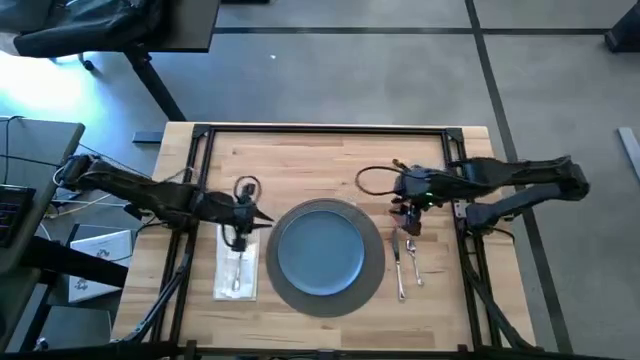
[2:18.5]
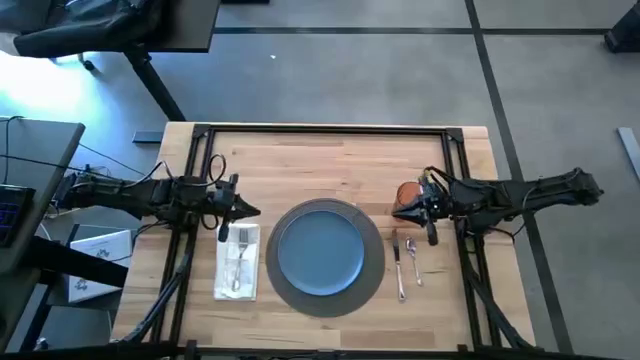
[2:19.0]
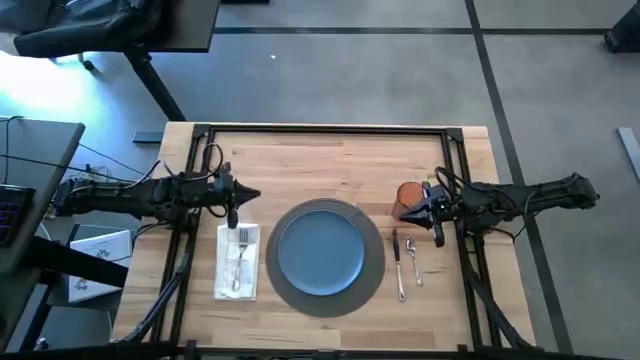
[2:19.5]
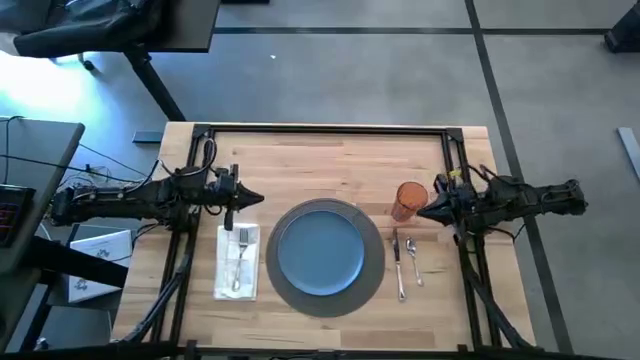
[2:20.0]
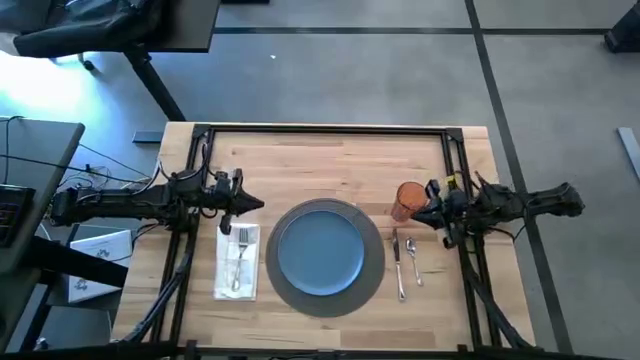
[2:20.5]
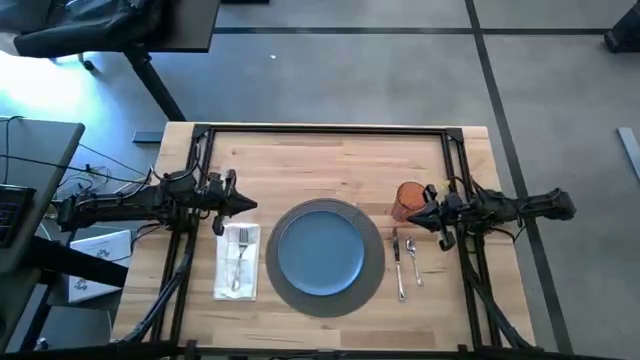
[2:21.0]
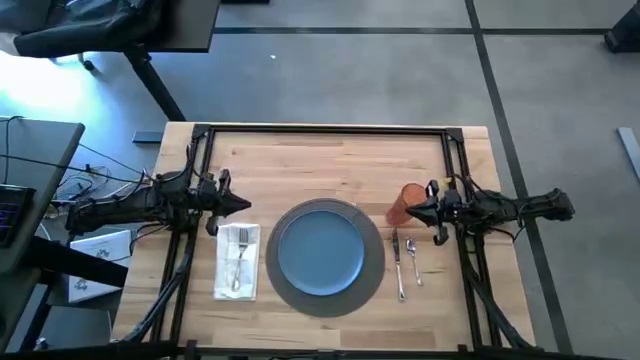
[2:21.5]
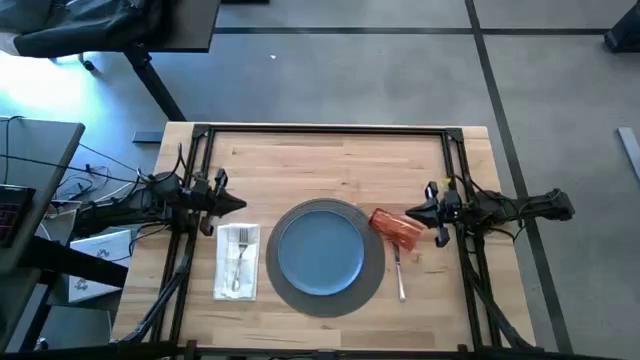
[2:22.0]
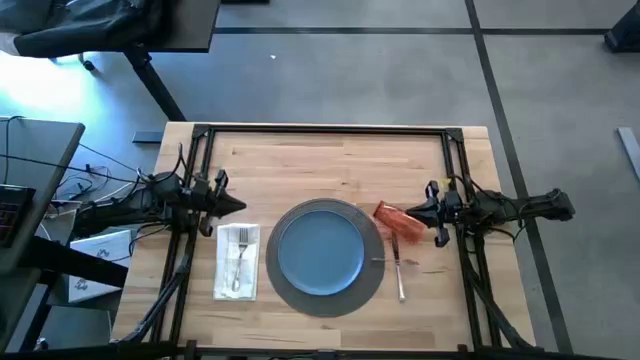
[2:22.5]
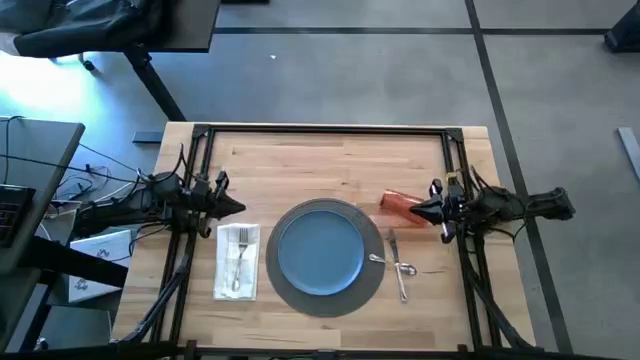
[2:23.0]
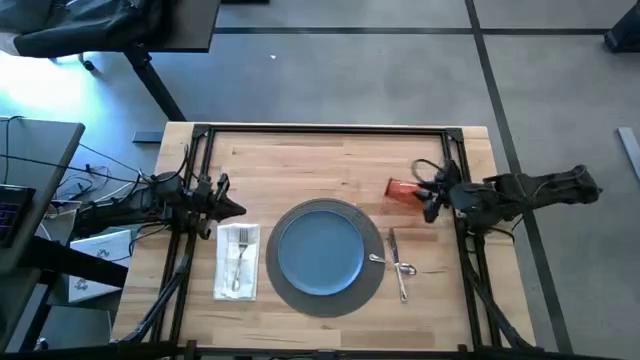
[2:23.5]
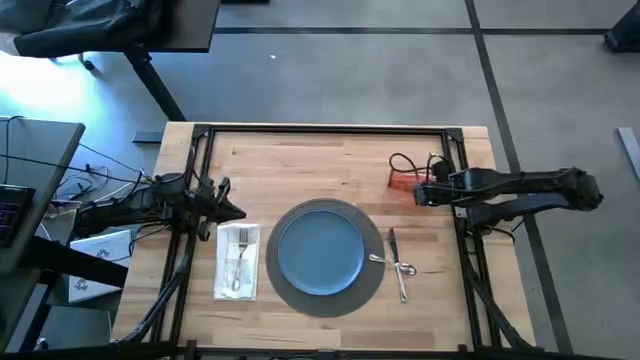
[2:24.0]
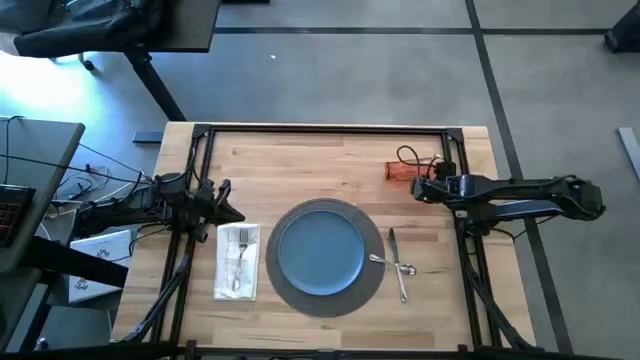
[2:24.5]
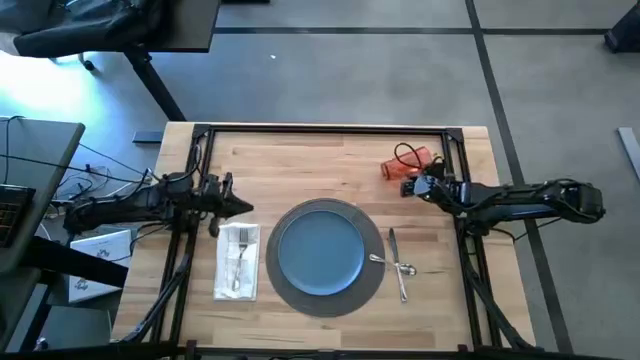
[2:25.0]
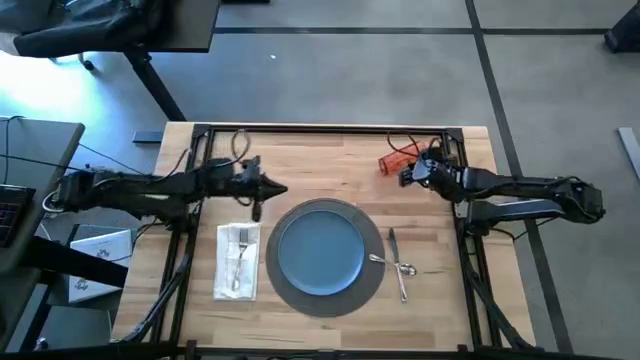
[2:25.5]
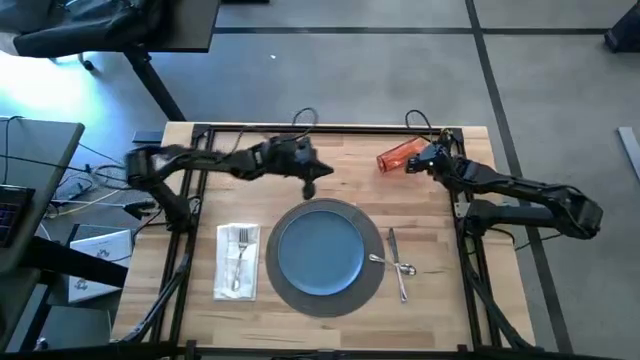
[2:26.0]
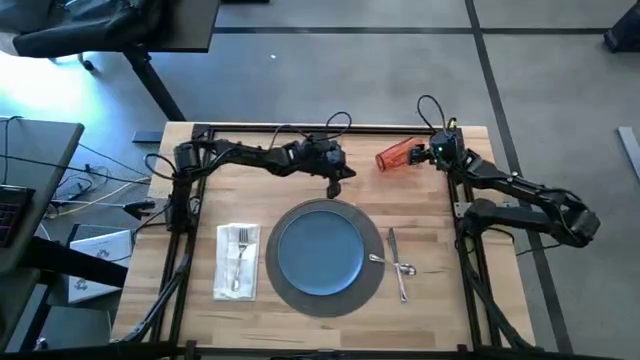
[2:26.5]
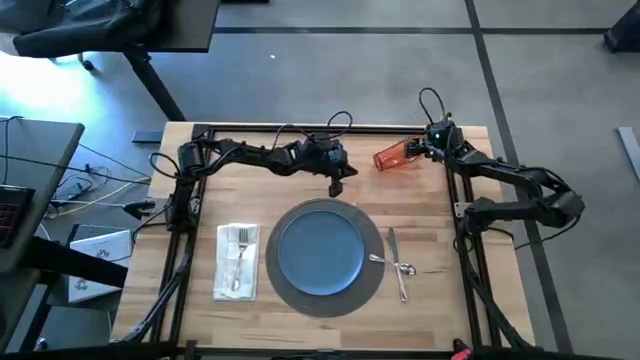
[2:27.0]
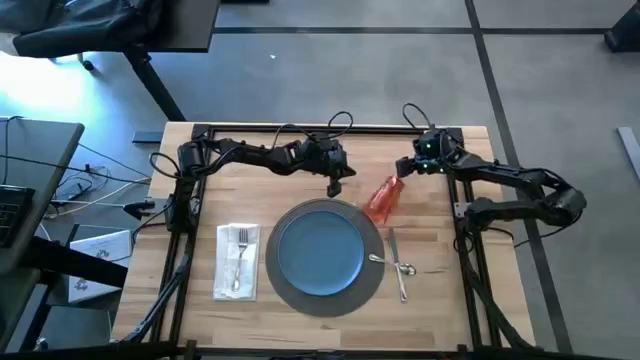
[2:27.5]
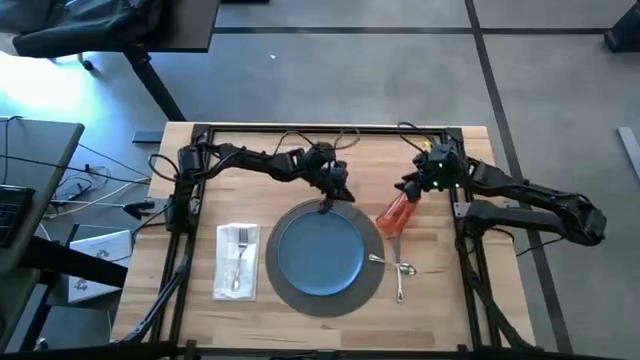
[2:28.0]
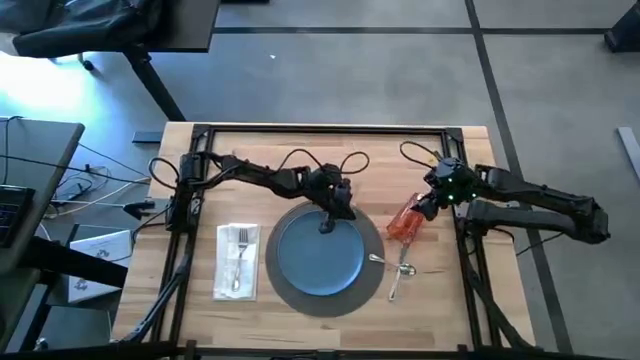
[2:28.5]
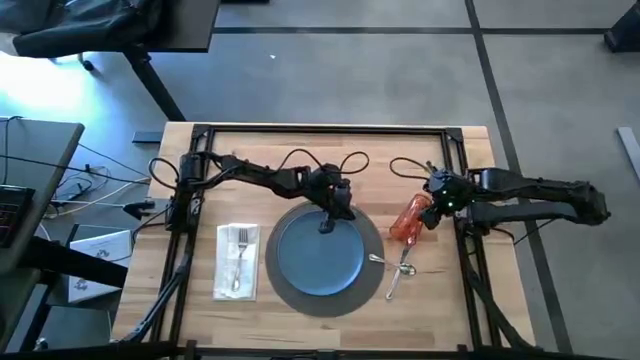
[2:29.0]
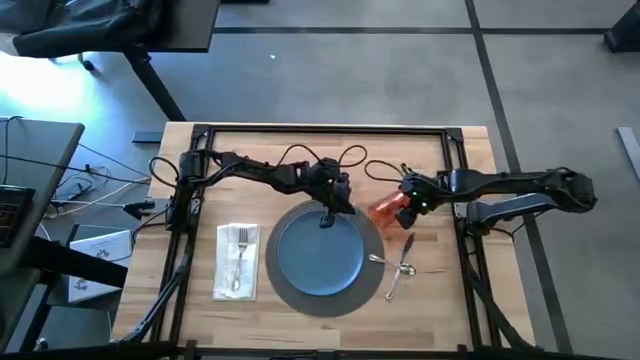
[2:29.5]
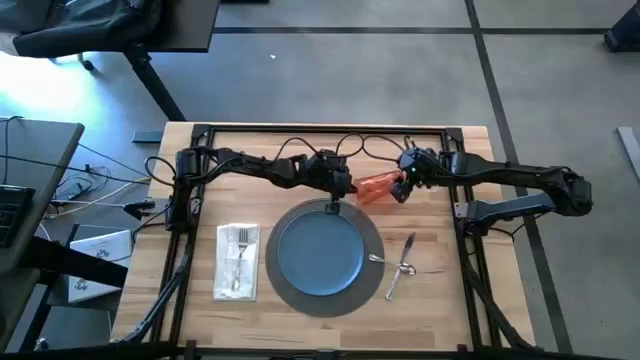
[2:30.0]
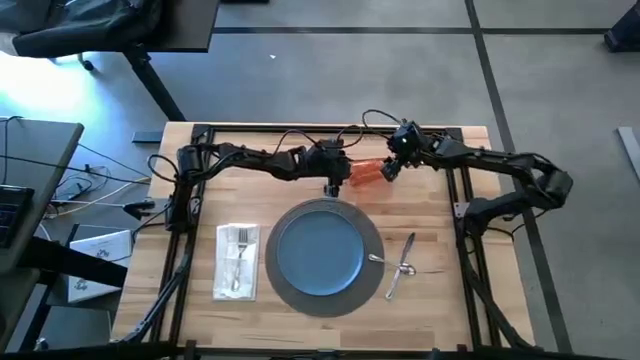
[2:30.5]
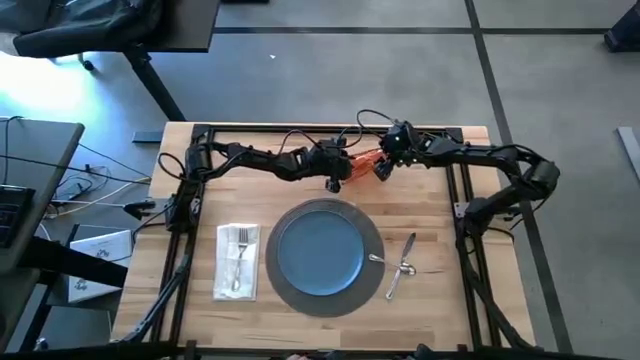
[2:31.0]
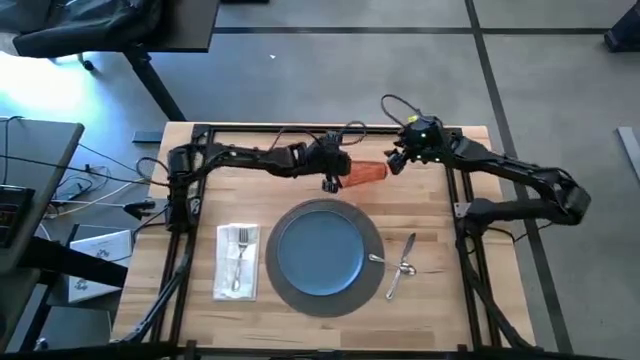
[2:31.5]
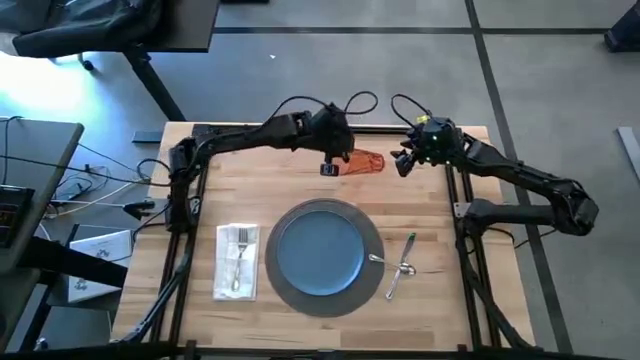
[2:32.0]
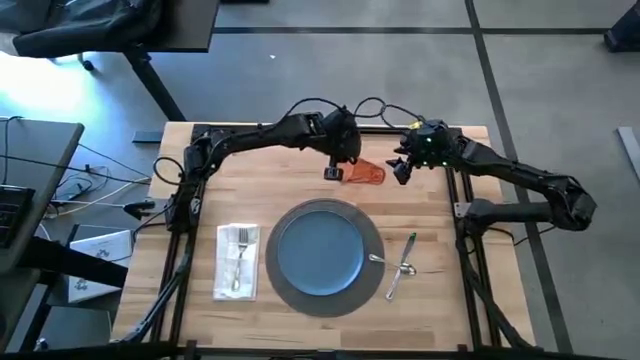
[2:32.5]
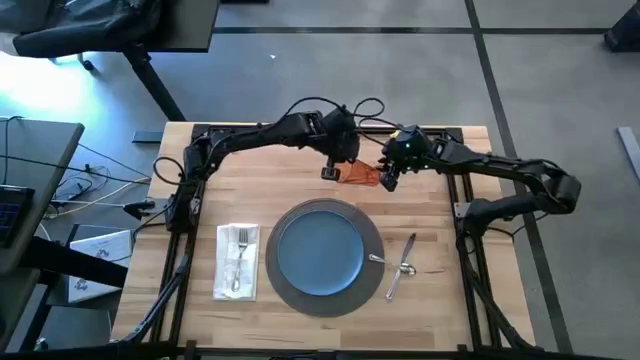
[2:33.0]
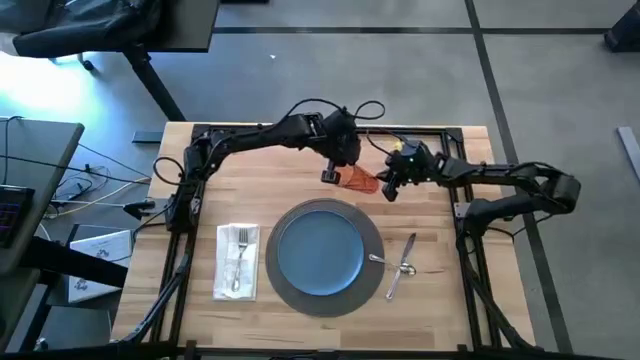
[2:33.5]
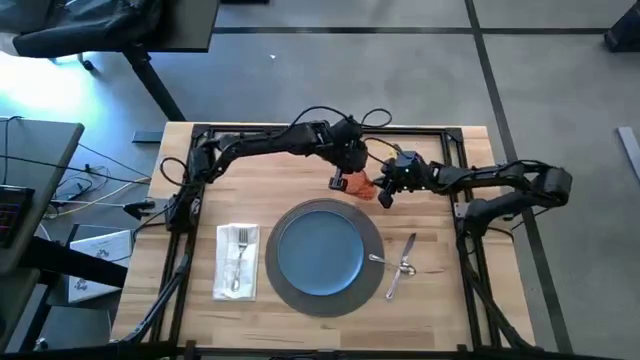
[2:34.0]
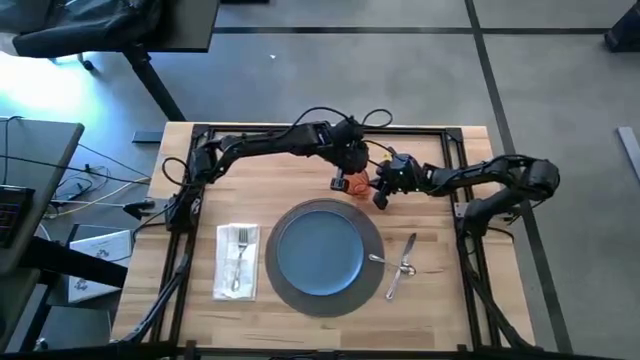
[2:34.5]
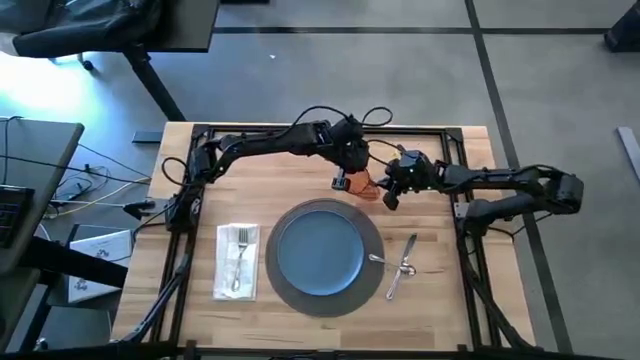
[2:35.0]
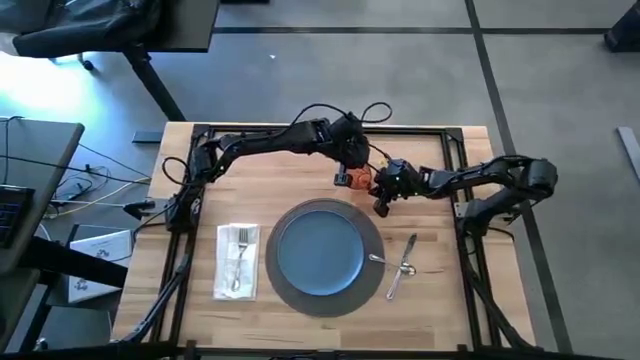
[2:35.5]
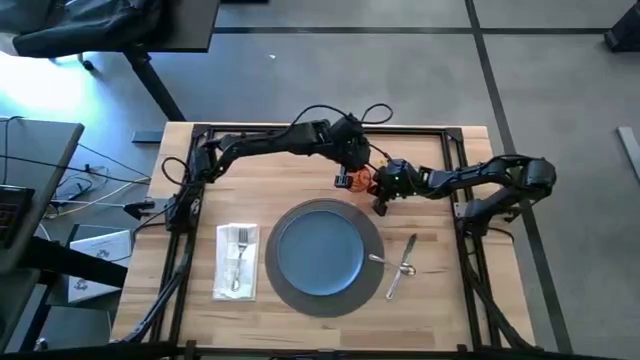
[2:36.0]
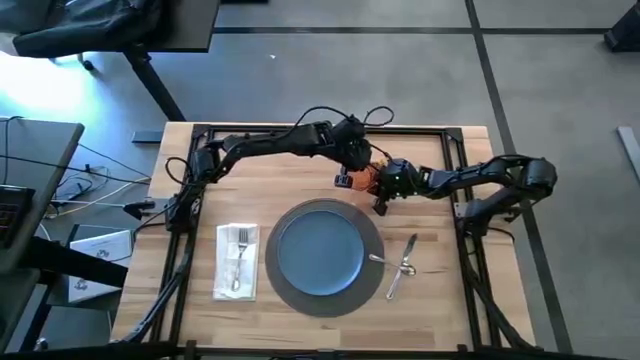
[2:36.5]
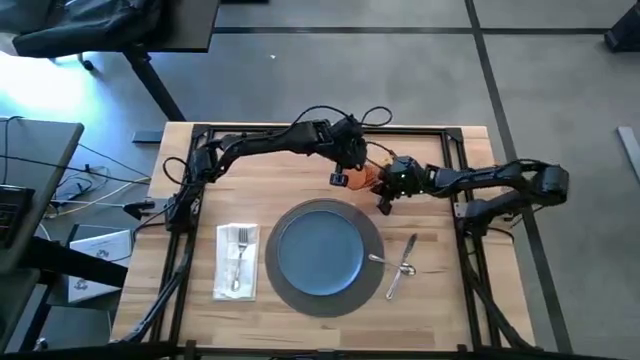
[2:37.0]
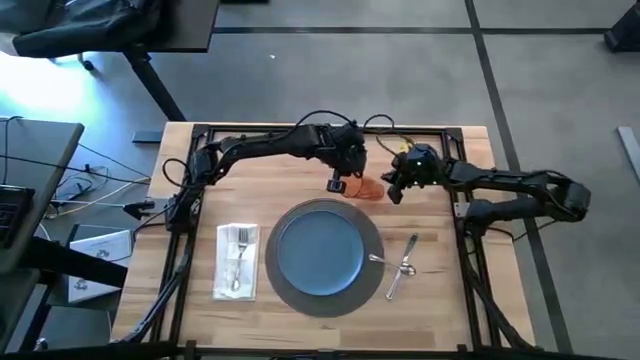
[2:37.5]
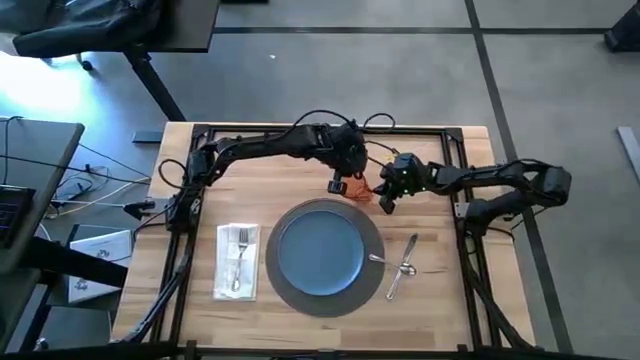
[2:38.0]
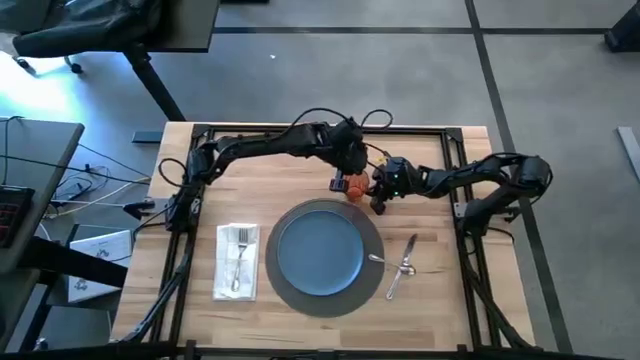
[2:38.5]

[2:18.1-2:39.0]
Task: Set table place
Adjust the orange cup

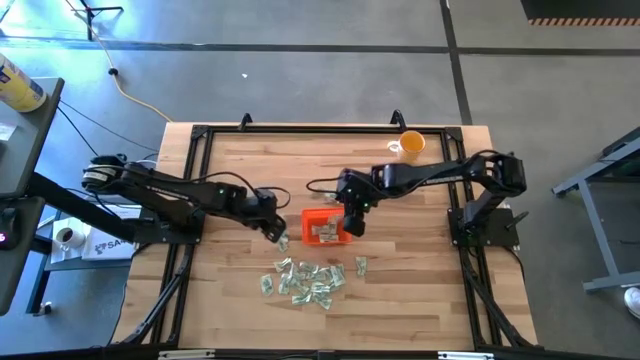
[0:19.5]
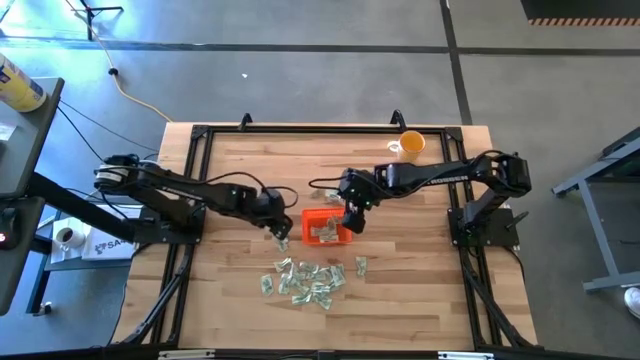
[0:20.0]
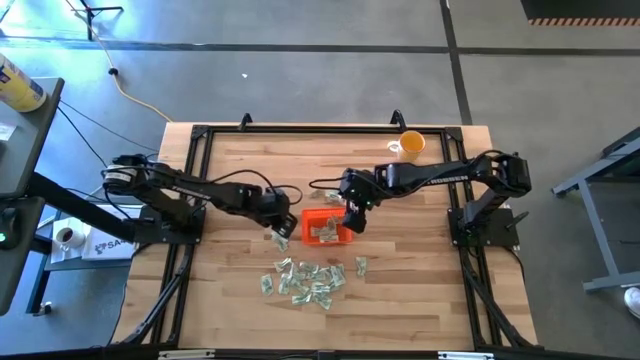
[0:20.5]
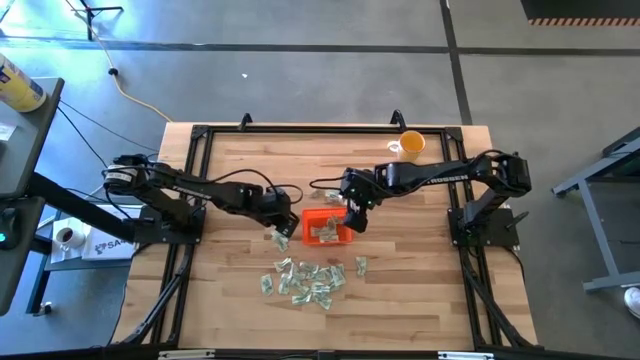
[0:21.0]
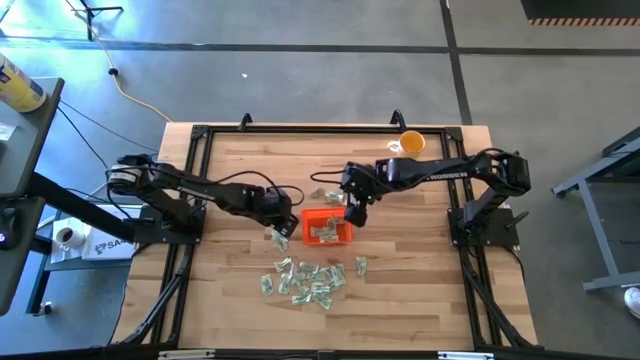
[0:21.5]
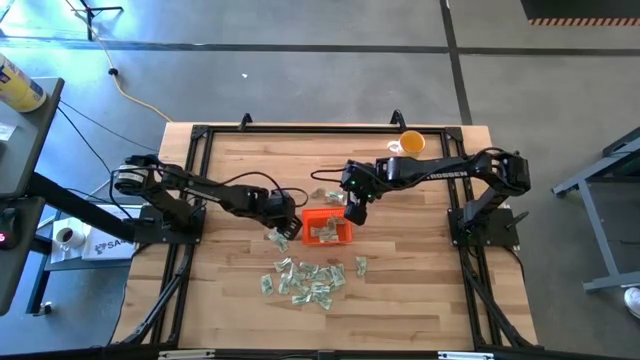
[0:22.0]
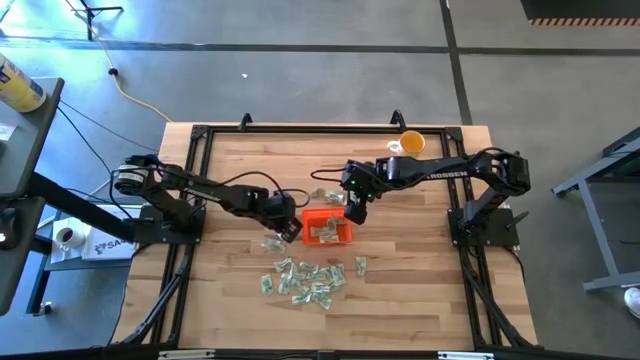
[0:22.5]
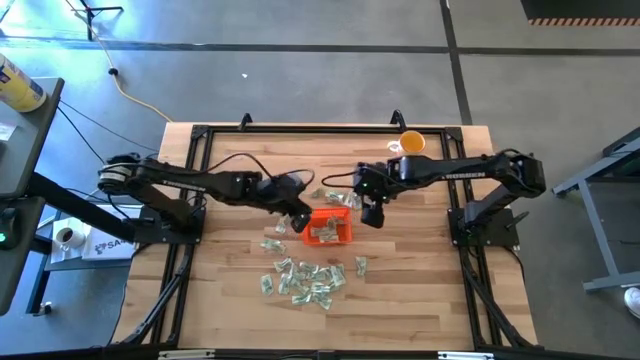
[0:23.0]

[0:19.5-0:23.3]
Task: Pick and place Stevia / Truvia into bins
Put the stevia packet into the orange bin
